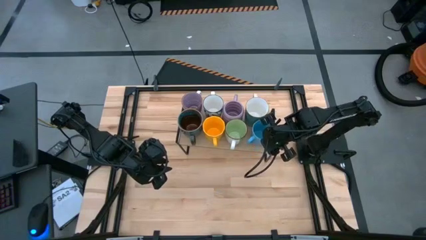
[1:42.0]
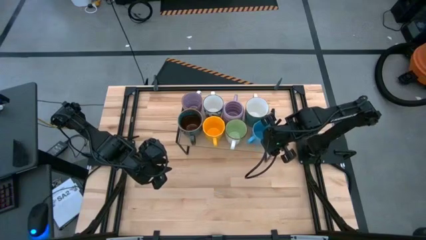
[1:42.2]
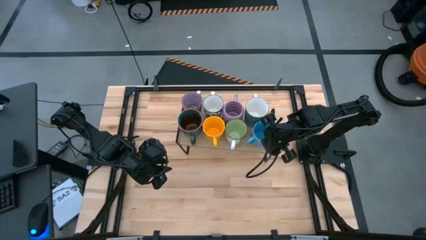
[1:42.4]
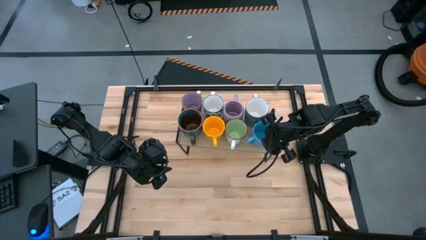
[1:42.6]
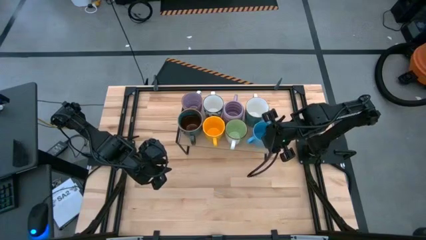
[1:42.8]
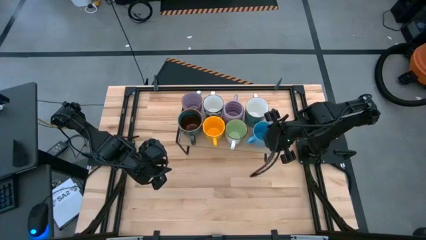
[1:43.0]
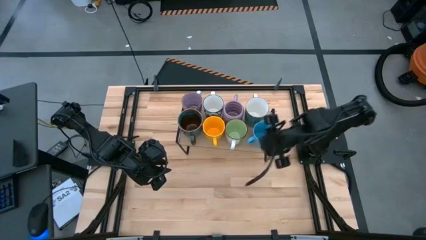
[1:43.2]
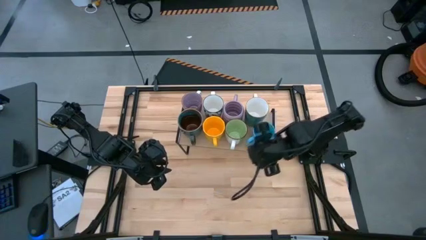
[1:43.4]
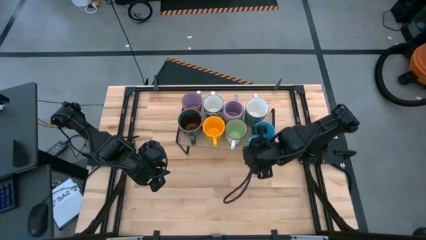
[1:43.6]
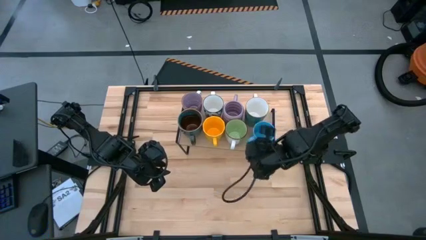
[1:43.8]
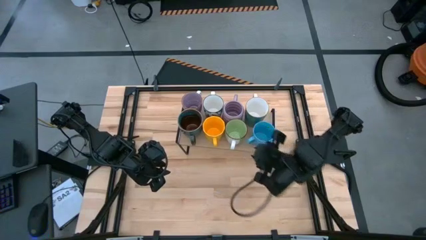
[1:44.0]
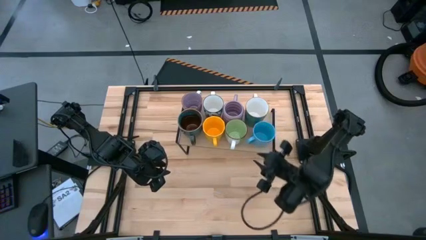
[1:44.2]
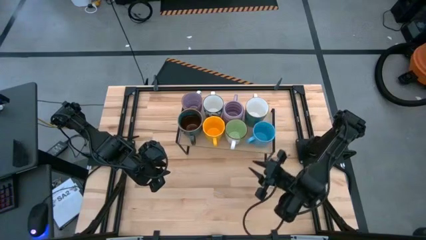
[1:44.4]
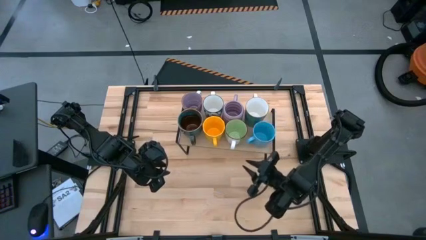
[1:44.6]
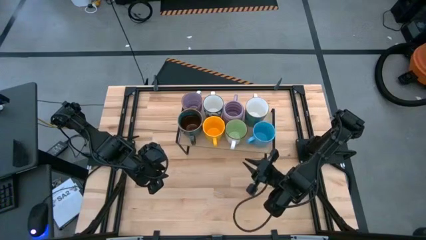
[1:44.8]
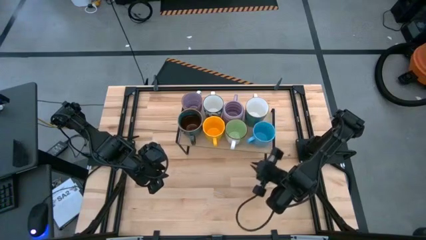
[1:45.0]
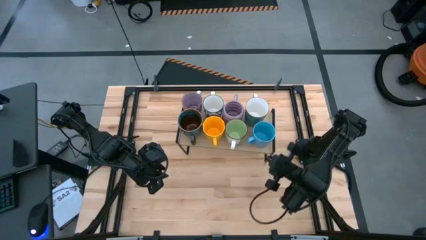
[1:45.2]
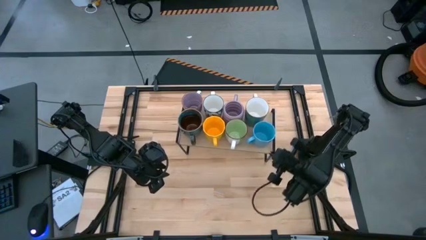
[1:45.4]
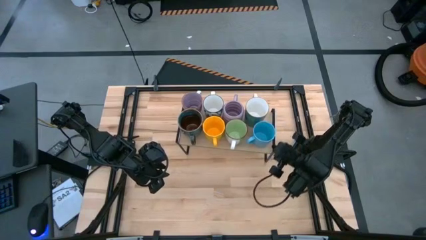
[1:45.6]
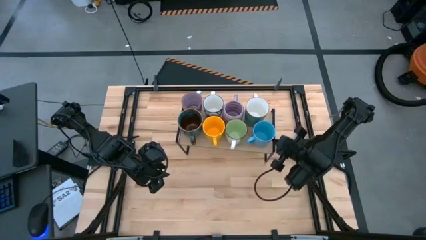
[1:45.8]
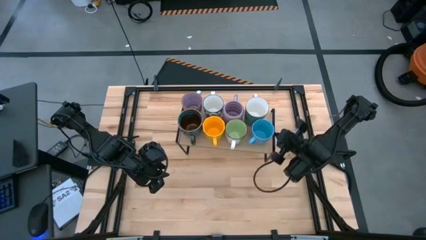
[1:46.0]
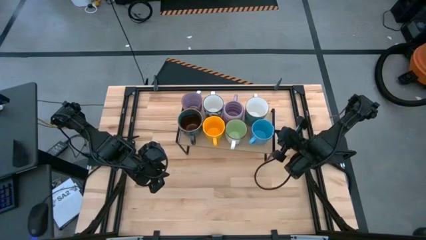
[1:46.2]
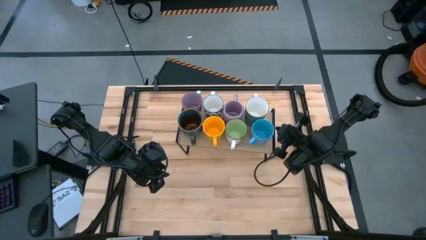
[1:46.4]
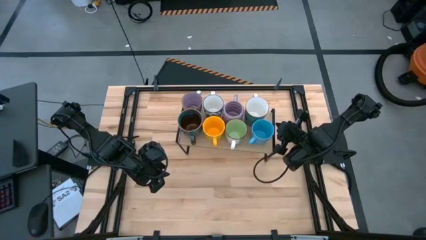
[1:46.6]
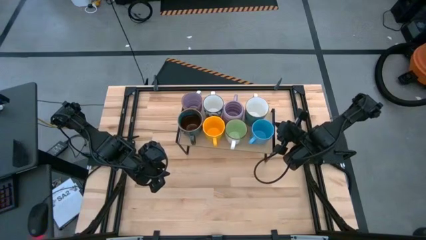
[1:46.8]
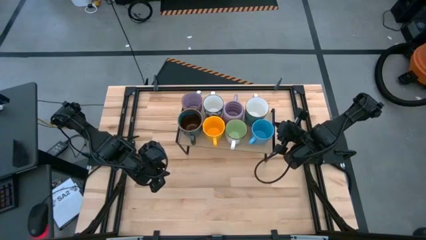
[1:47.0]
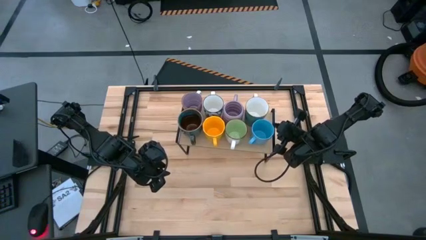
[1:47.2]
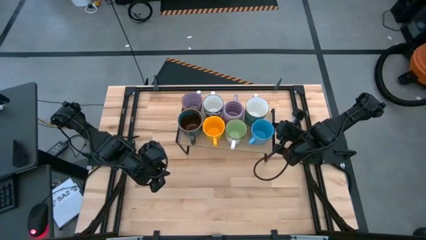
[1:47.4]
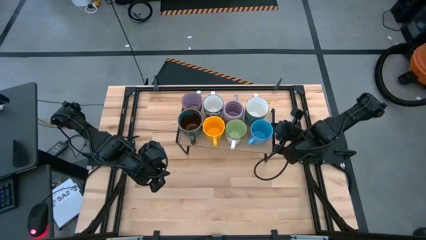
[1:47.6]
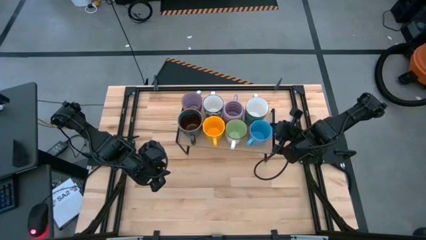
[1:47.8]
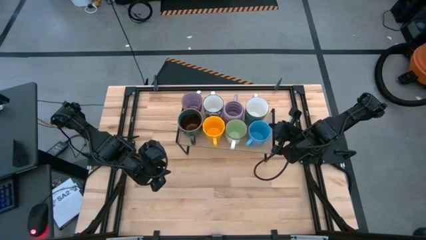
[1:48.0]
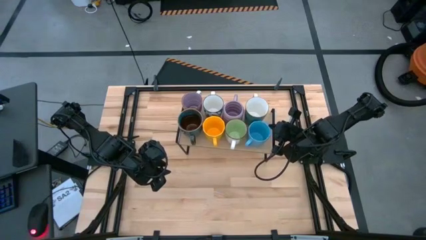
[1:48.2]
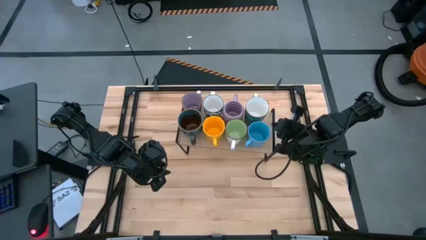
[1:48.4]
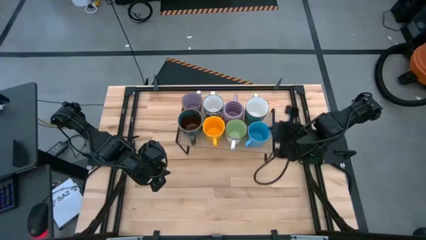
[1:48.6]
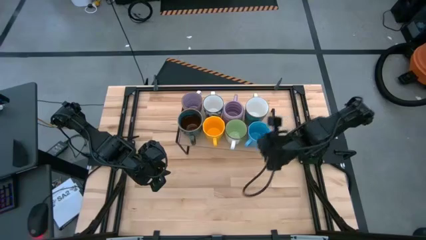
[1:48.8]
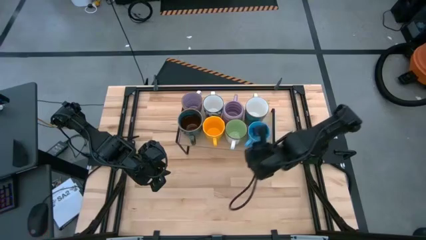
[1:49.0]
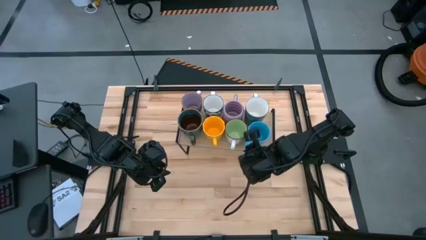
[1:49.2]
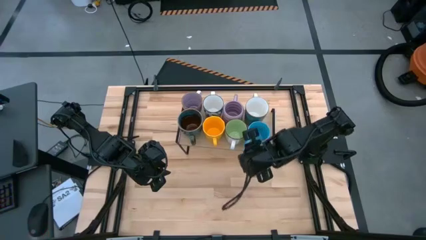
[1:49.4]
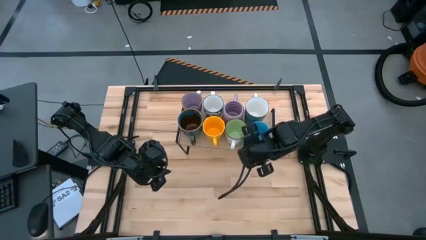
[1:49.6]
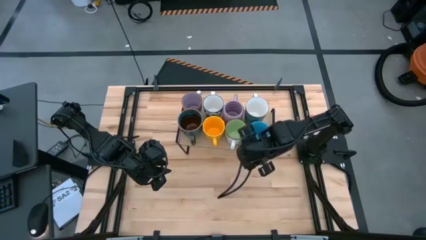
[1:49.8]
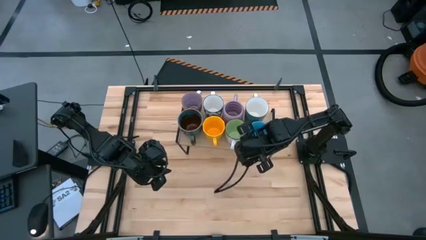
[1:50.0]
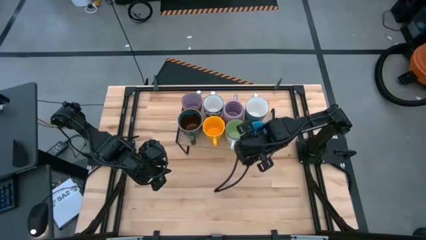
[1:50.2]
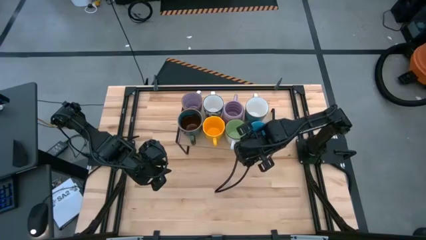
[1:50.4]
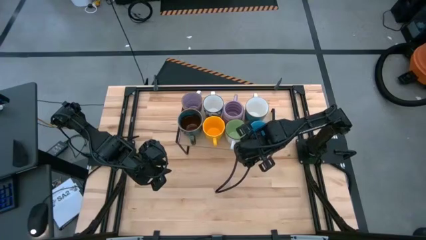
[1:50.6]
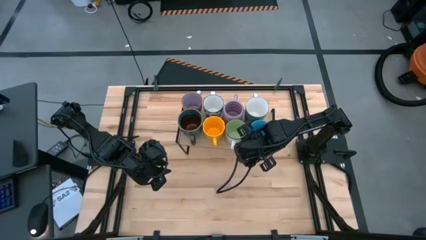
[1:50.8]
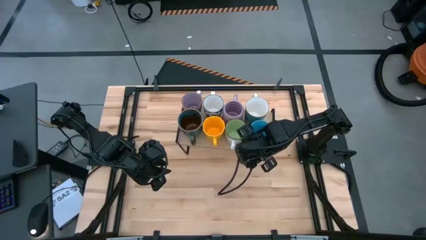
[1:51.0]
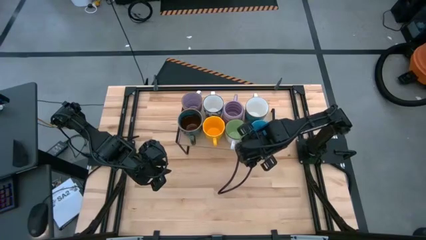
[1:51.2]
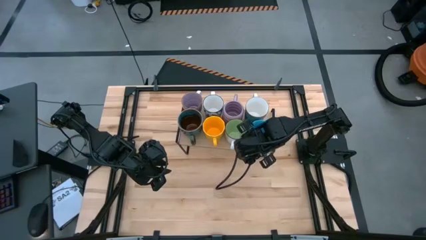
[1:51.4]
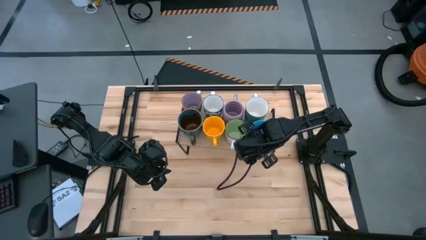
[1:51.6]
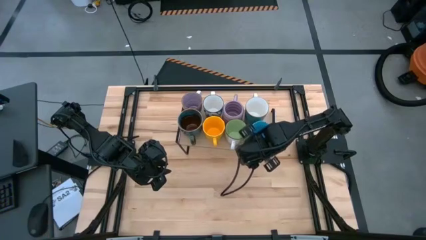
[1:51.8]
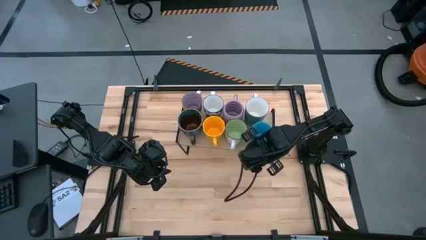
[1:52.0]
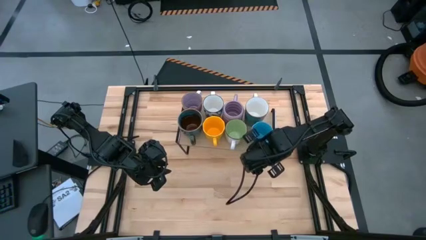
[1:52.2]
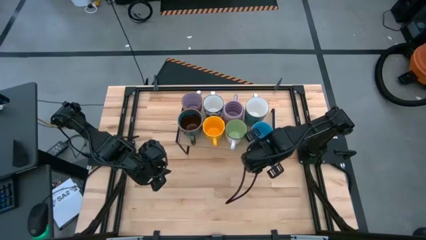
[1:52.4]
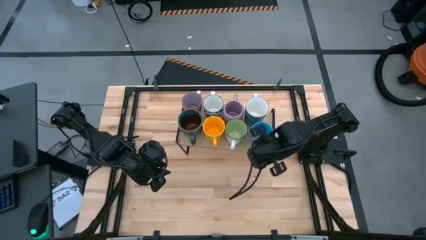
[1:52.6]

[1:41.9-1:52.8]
Task: Place coffee mugs
Put the light blue mug on the shelf

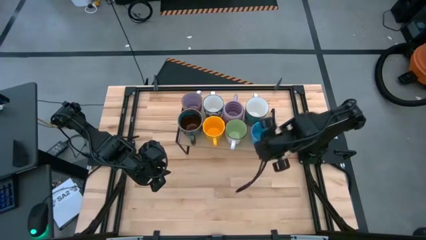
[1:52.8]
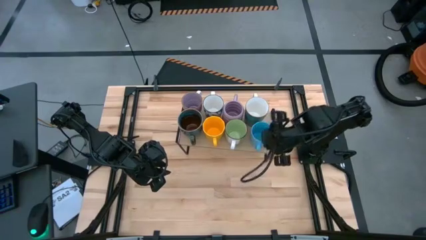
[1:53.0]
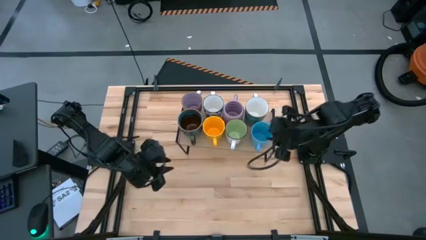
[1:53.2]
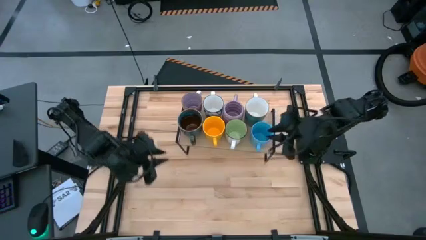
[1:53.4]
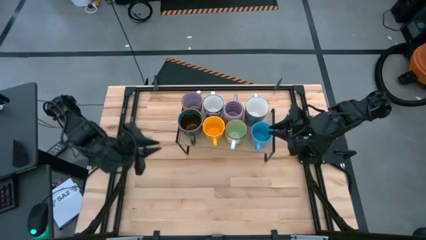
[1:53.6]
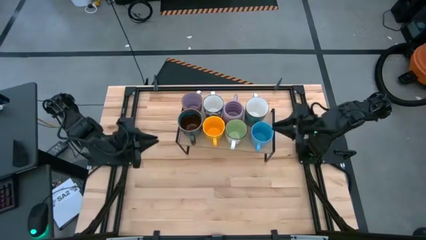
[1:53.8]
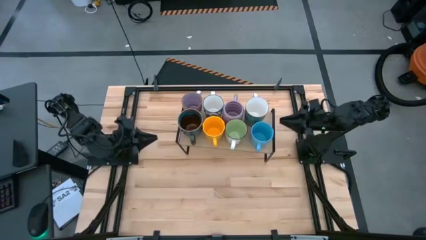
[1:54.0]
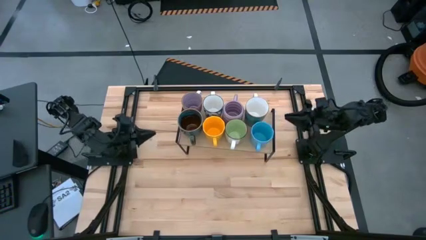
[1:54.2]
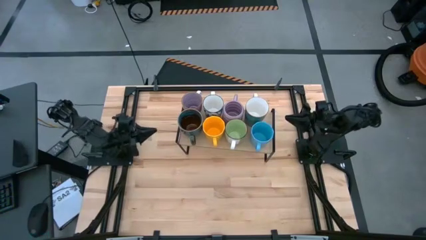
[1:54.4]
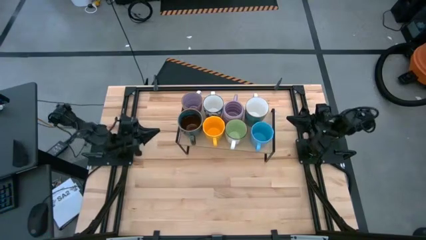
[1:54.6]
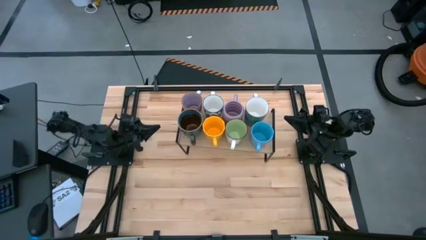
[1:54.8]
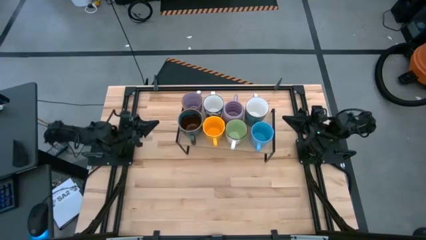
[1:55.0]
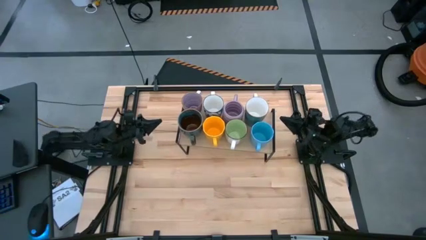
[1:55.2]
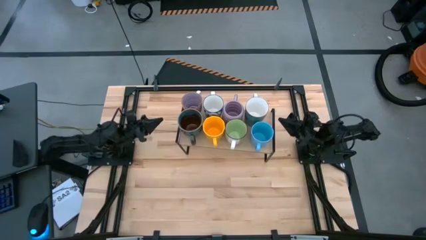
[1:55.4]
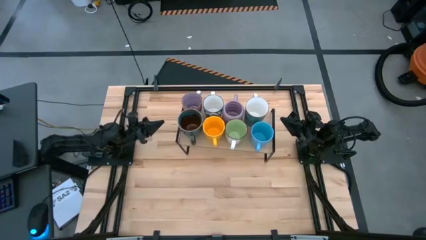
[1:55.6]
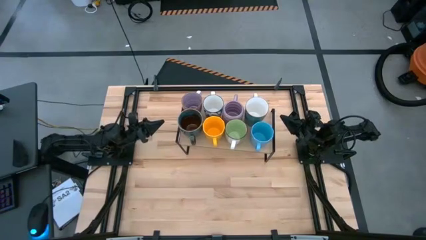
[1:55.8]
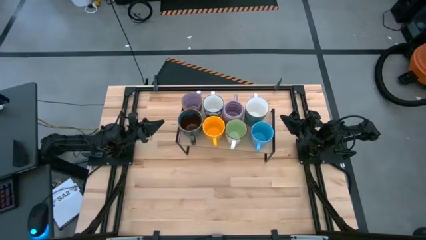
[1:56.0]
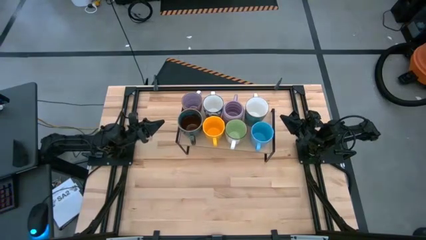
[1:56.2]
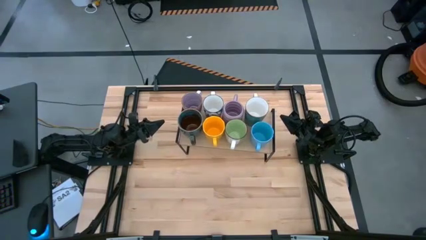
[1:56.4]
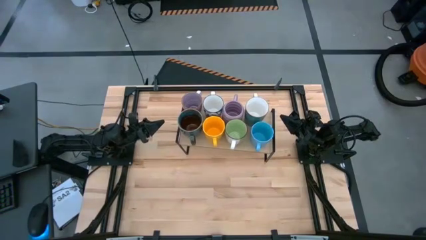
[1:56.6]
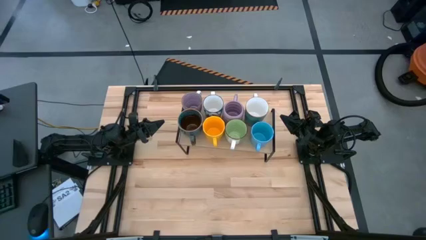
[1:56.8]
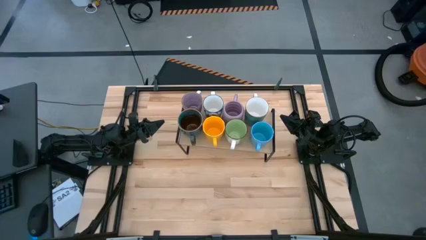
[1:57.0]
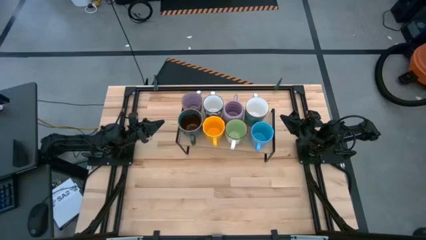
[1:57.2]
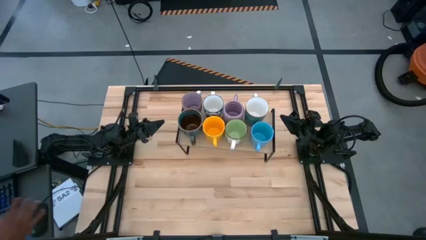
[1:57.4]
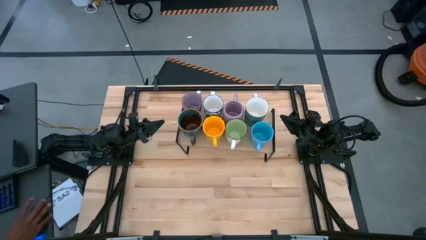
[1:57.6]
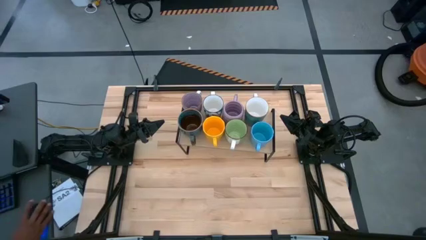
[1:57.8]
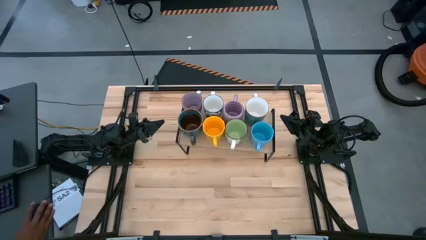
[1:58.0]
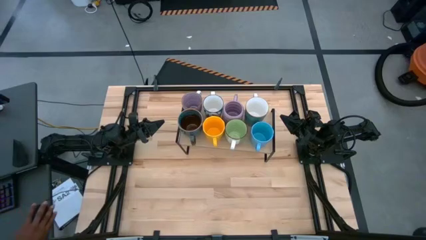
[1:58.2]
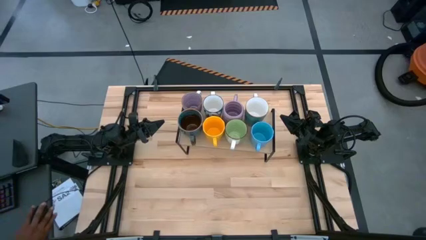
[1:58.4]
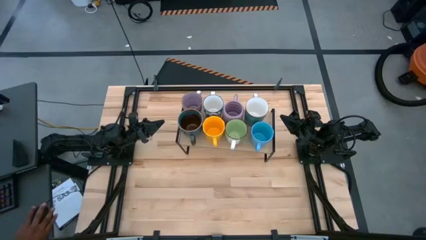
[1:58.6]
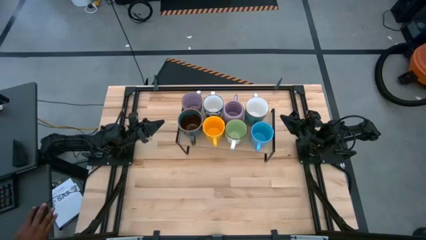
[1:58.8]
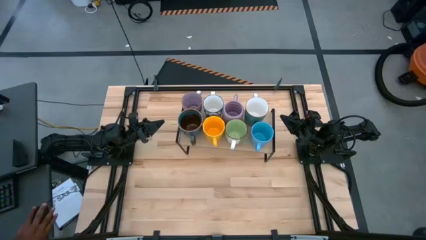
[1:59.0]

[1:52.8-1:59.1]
Return to Home Position
